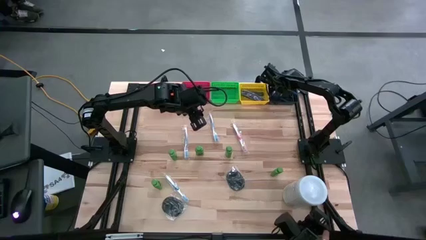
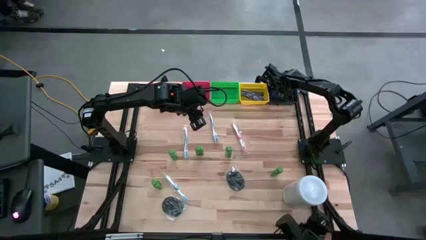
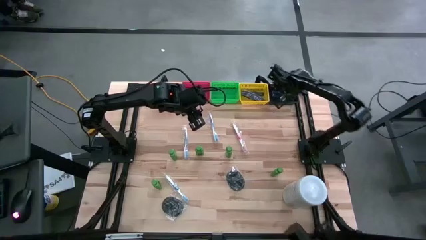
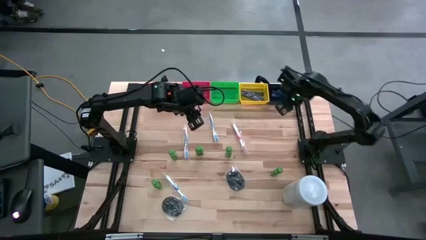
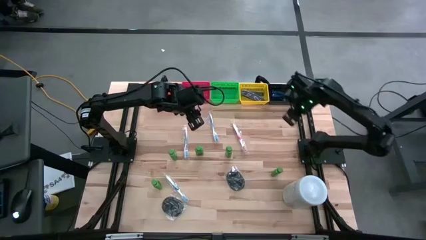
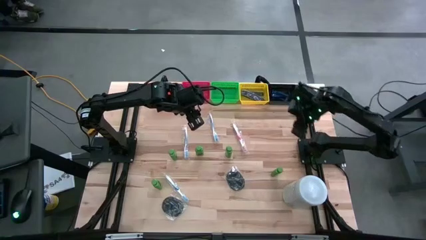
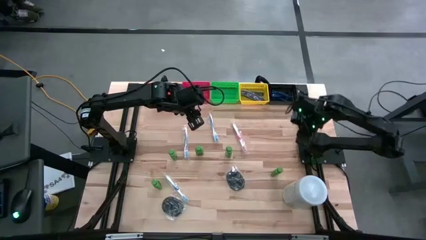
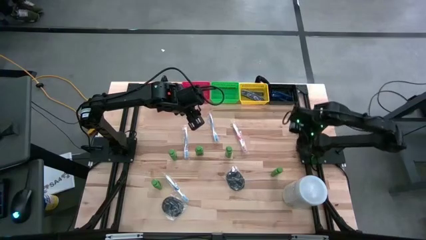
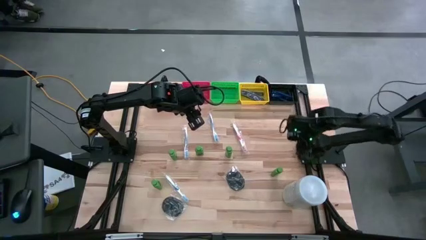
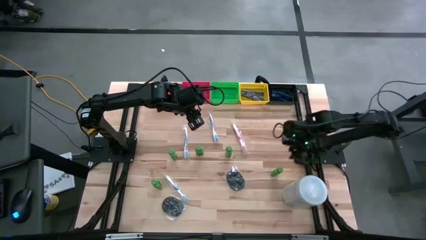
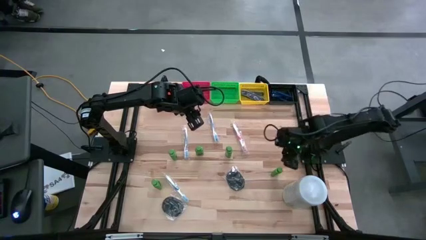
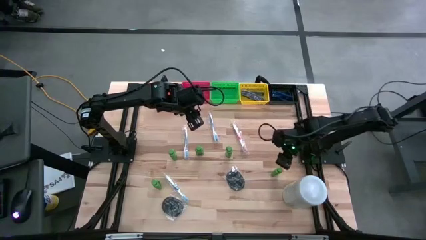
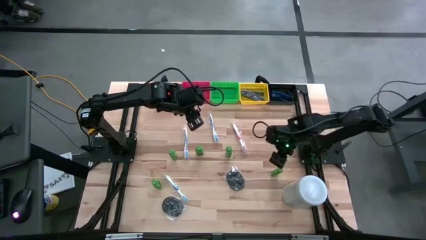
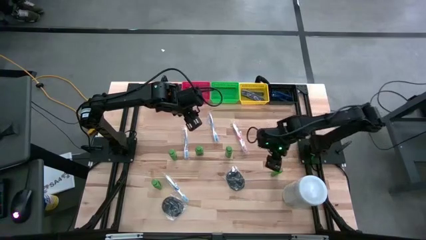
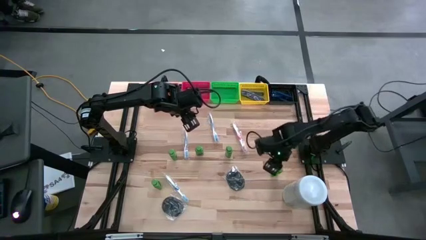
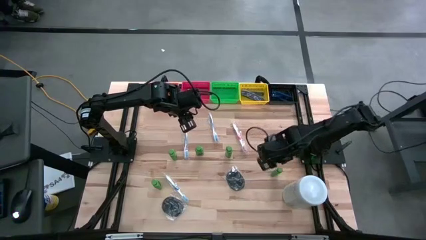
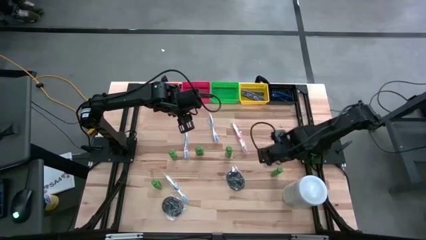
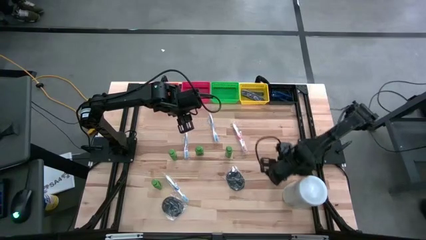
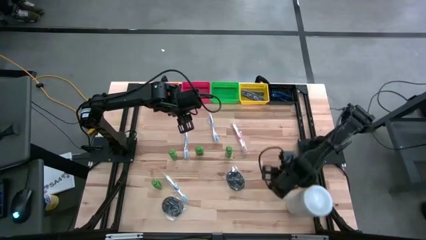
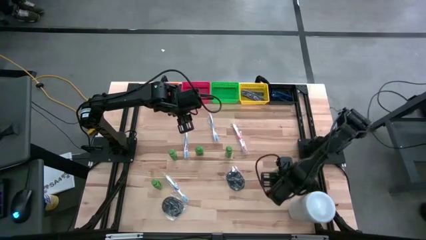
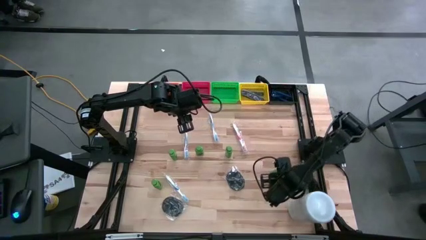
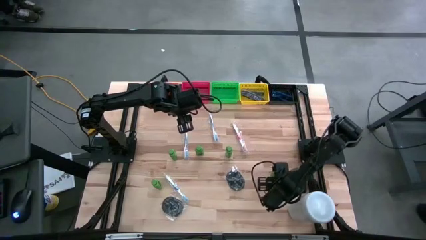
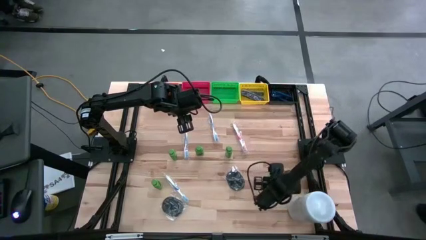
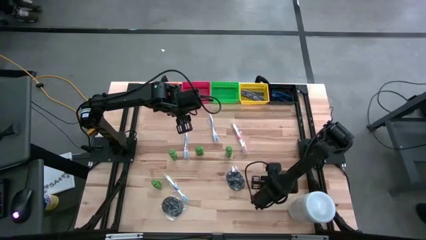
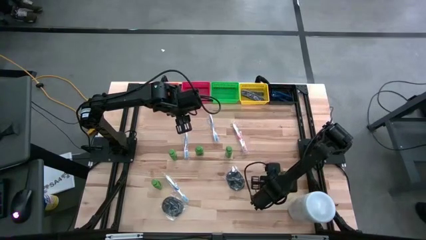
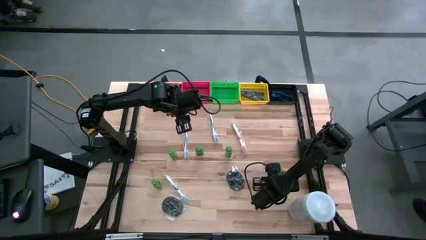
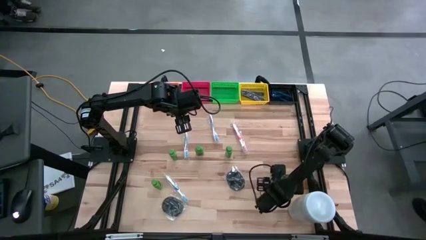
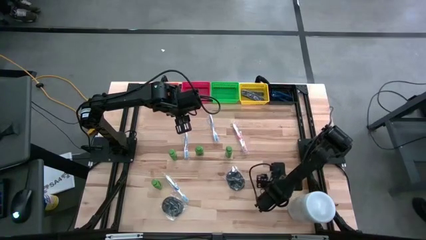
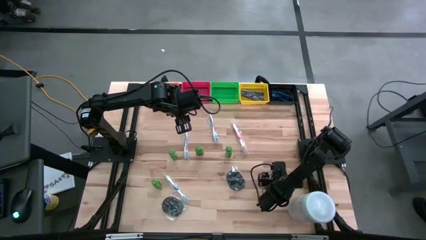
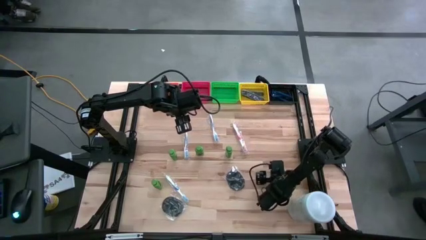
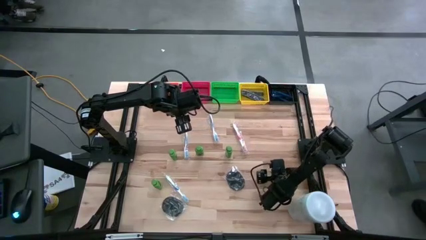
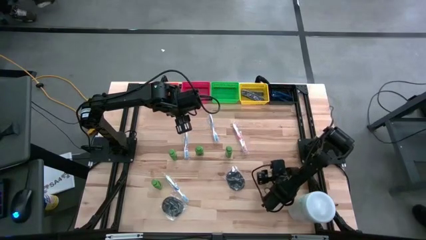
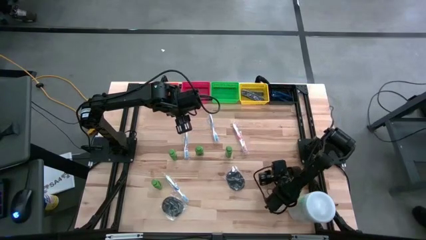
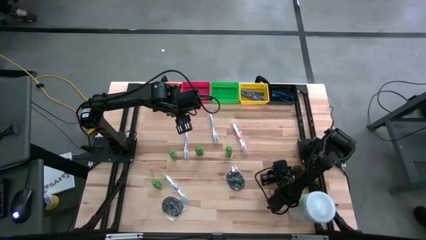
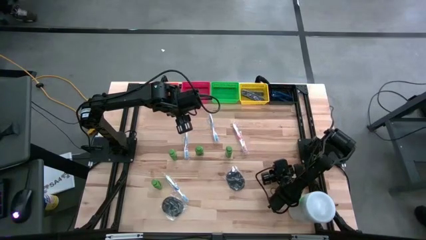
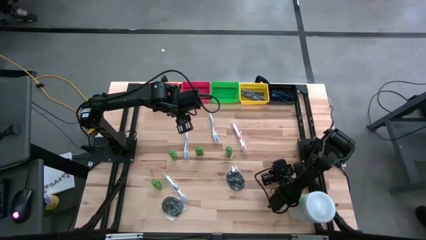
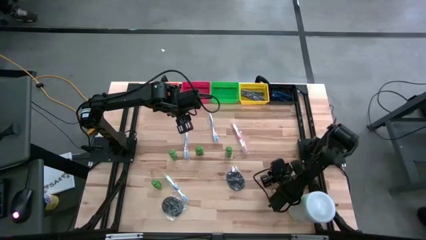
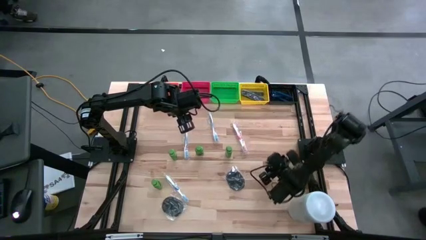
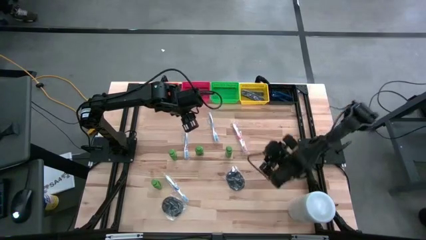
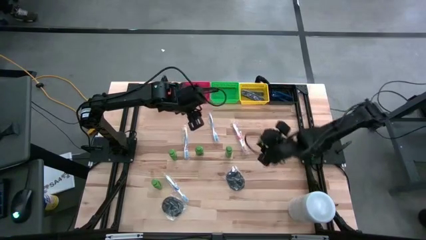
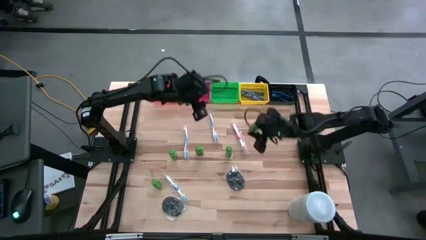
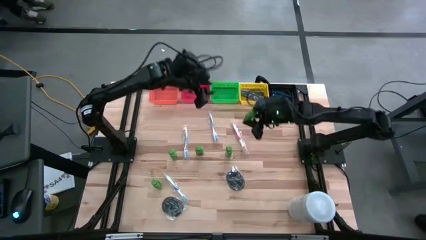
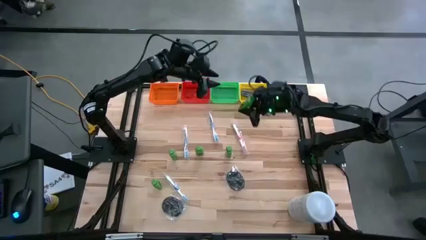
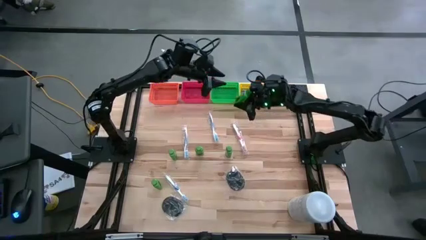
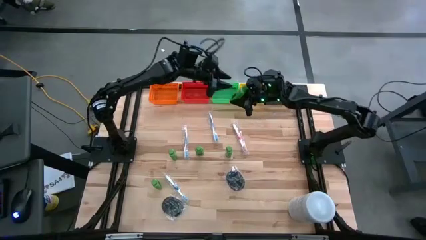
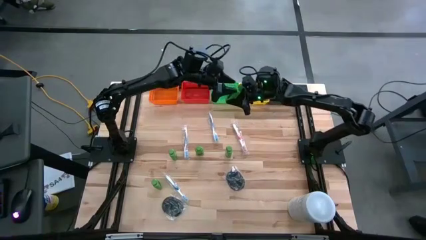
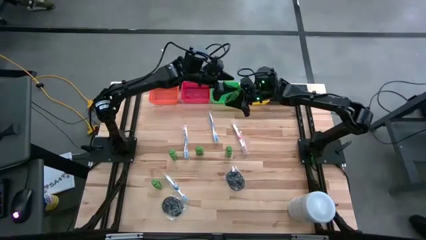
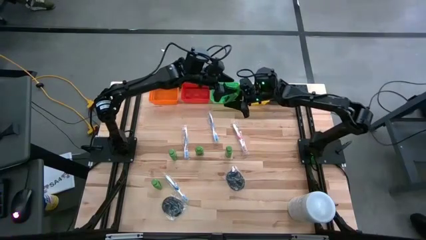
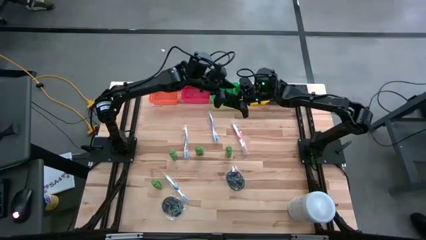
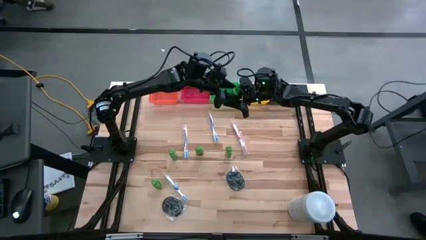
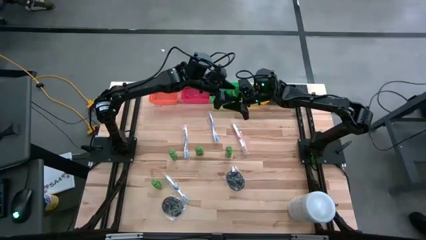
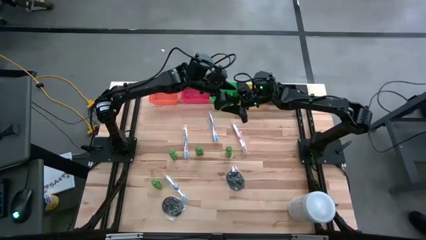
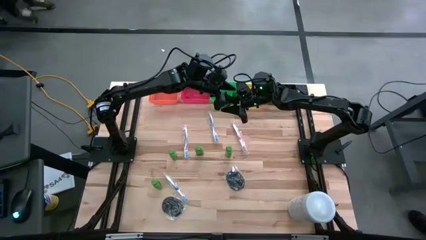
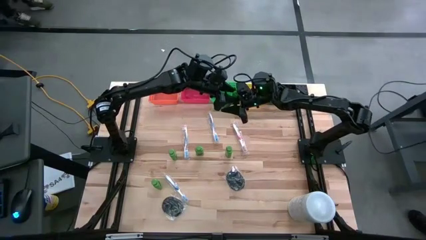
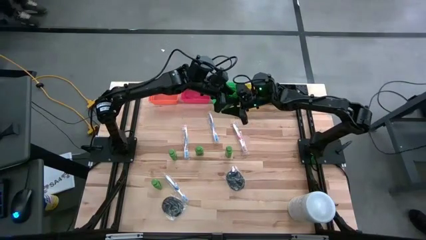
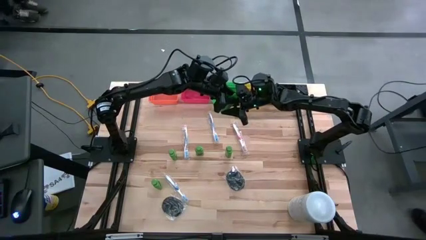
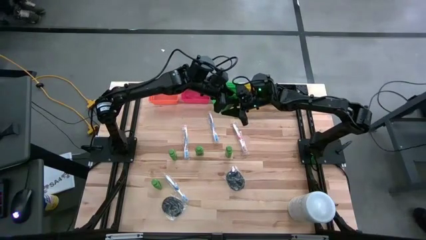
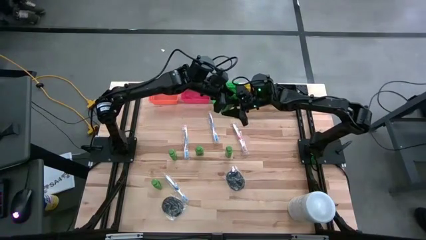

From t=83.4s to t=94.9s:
Task: Pick & Place Travel size toiletries
Put the green shampoo into the green bin

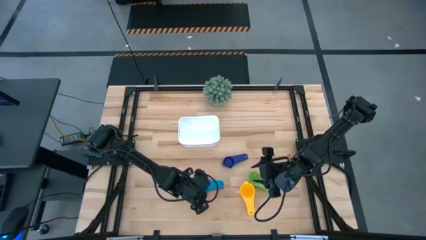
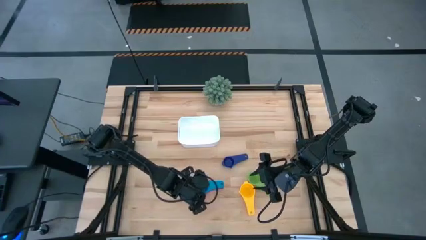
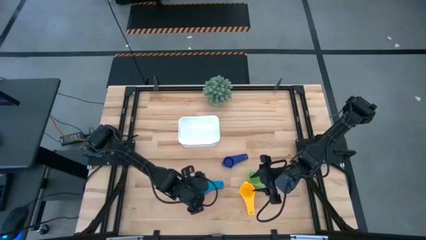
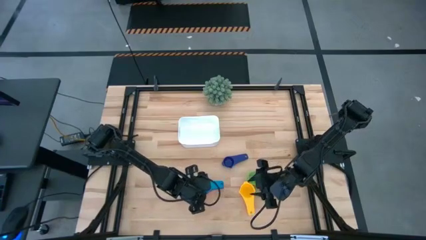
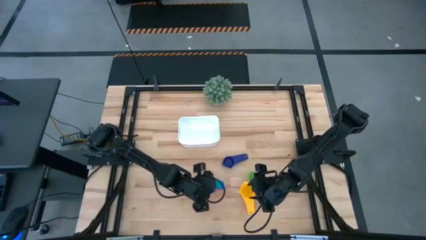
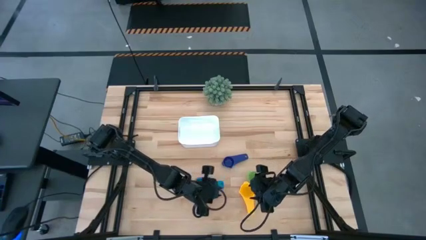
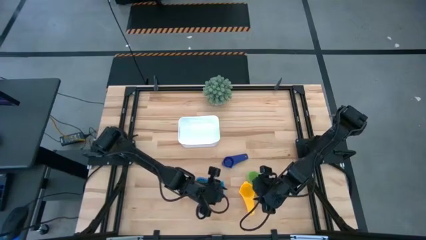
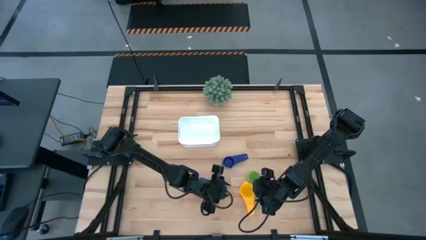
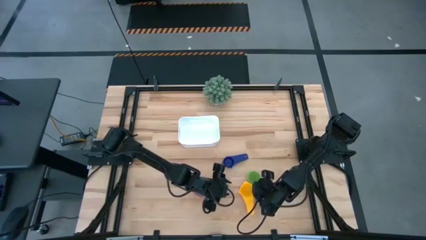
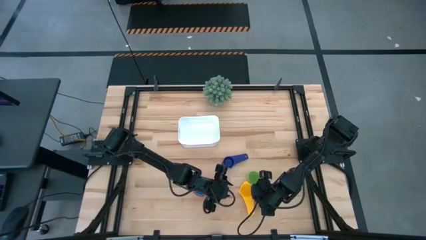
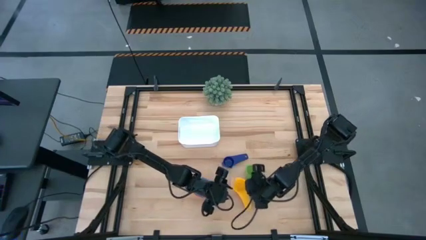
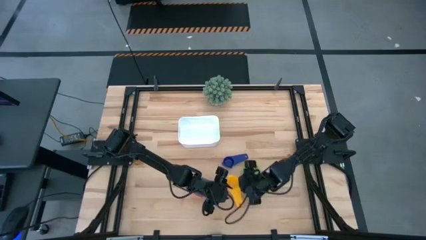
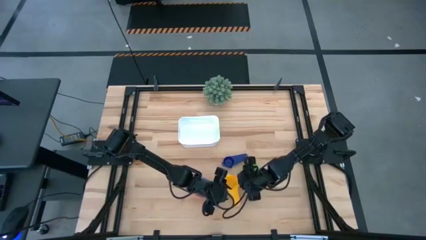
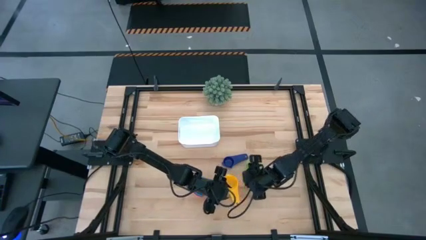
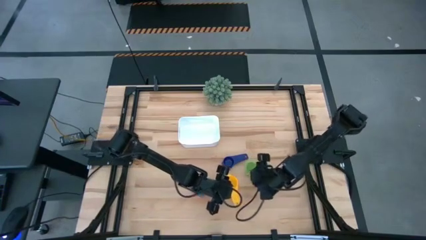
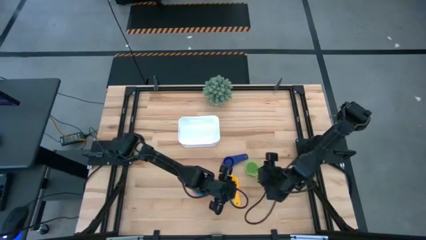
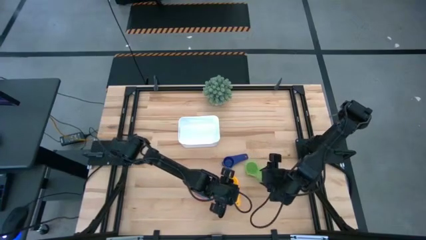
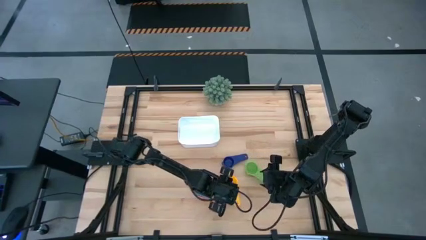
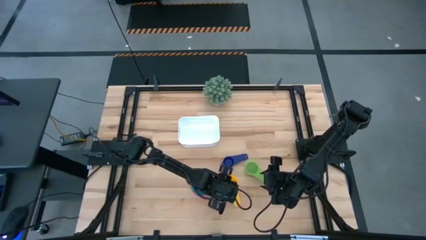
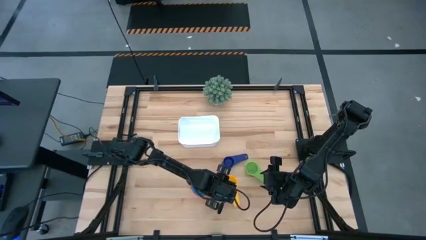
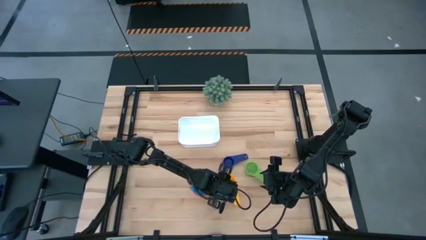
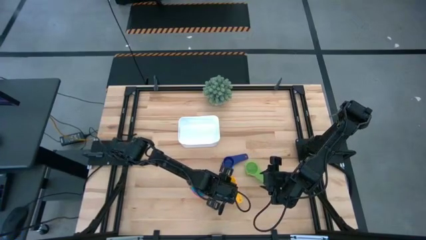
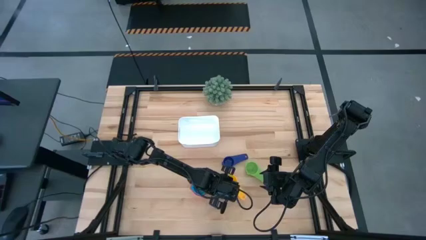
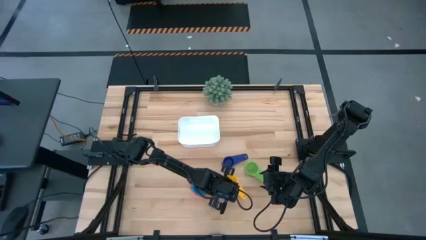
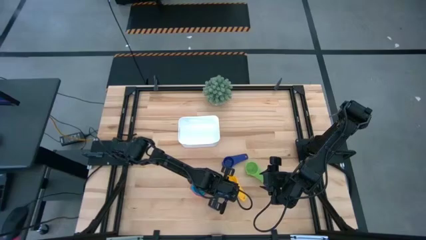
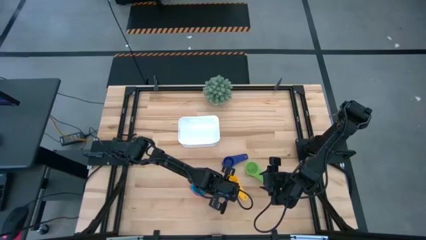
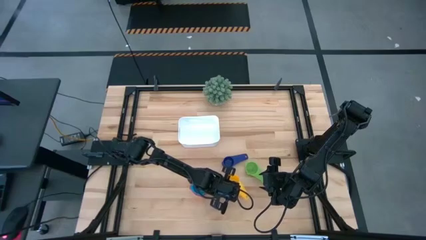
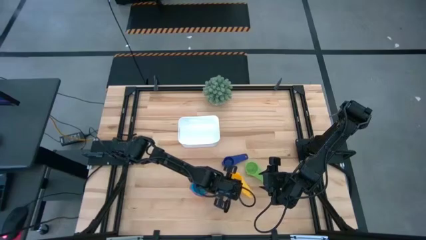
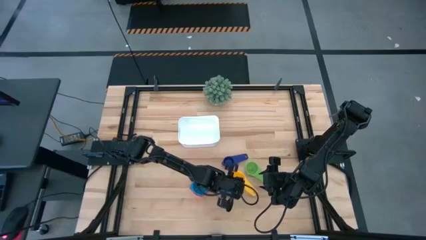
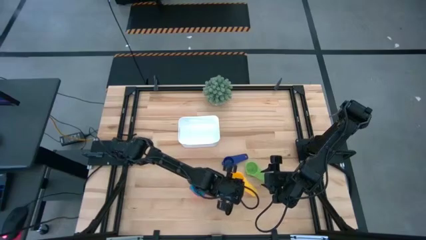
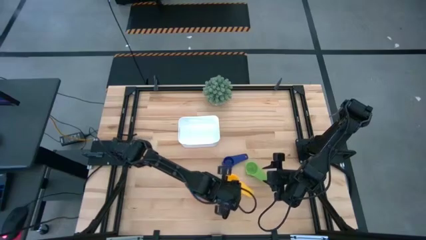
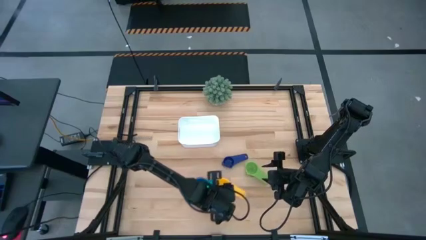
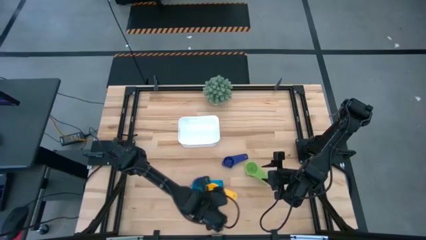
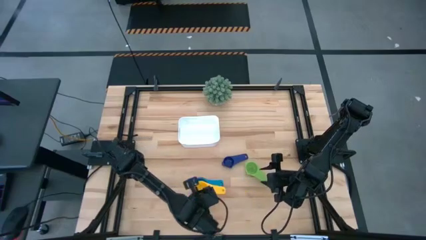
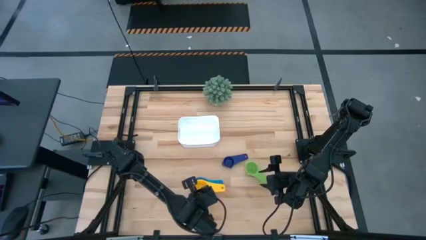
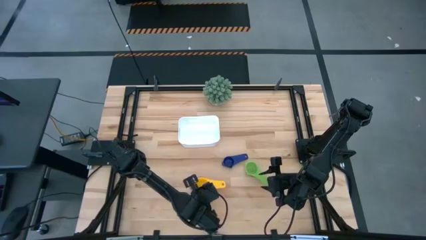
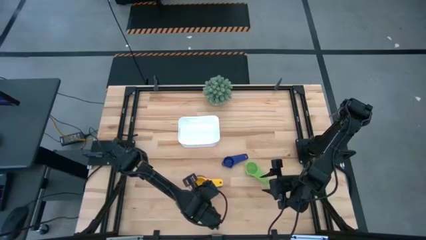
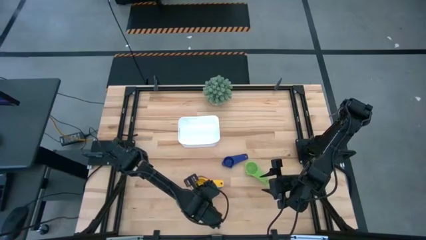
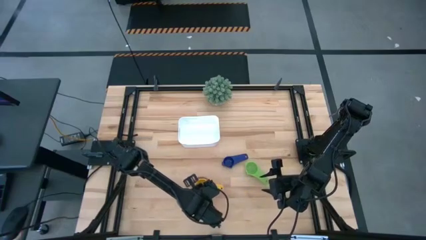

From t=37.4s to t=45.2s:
Task: Nest measuring cups in basket
Stack the yellow measuring cup on the top of the light blue measuring cup
